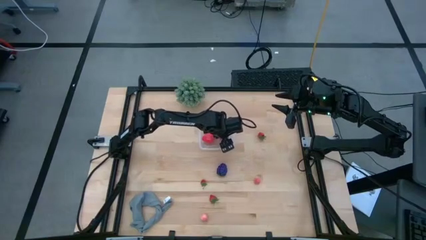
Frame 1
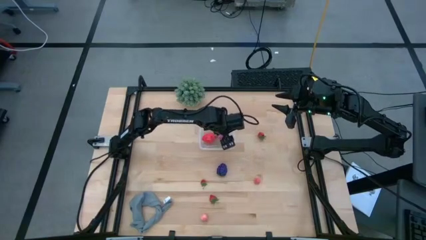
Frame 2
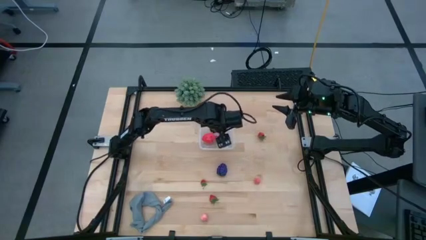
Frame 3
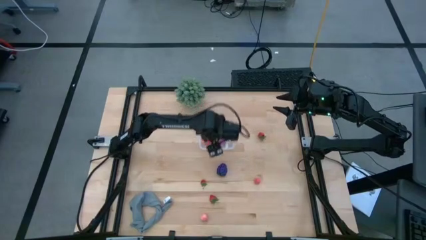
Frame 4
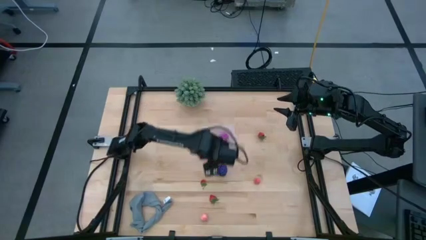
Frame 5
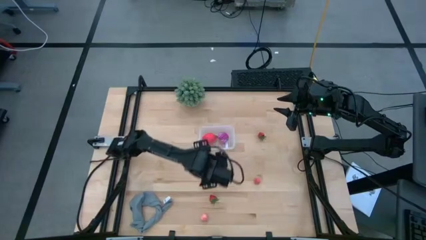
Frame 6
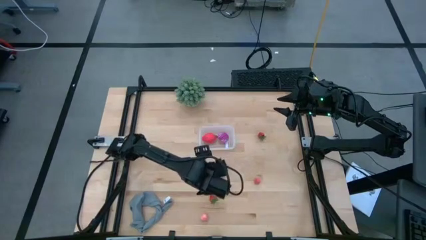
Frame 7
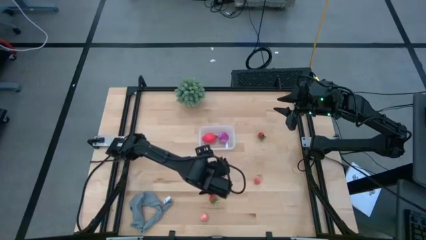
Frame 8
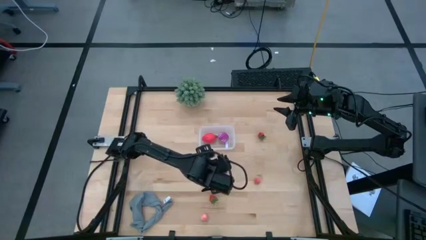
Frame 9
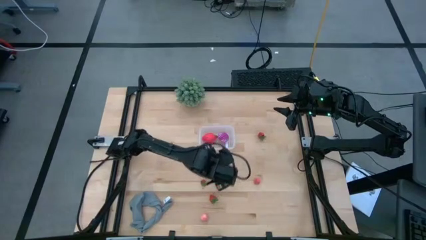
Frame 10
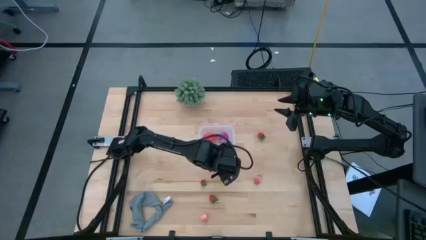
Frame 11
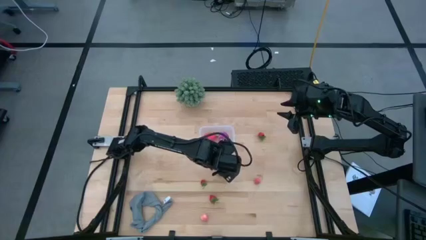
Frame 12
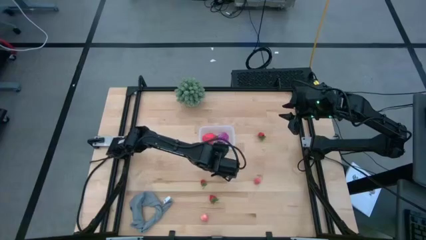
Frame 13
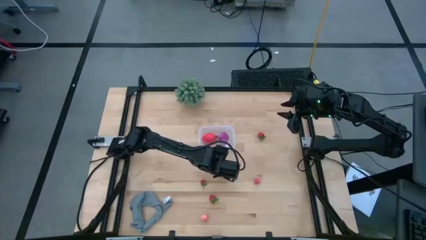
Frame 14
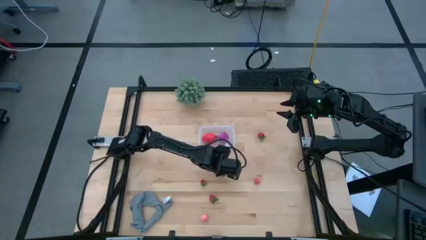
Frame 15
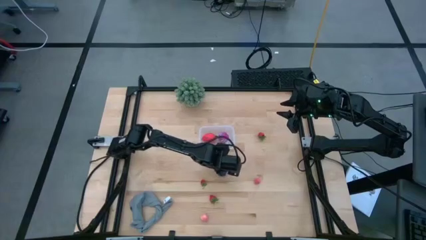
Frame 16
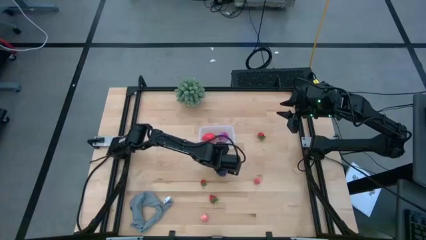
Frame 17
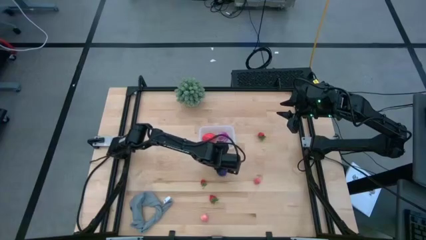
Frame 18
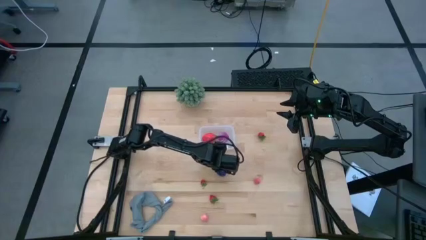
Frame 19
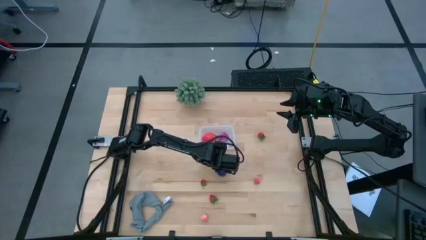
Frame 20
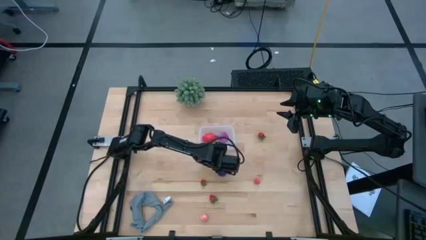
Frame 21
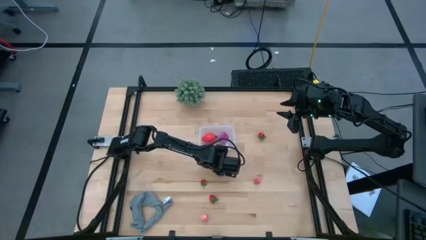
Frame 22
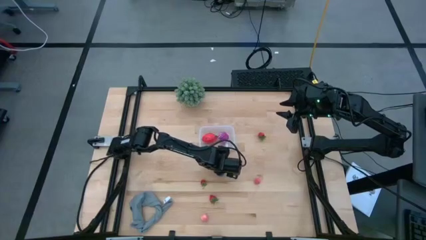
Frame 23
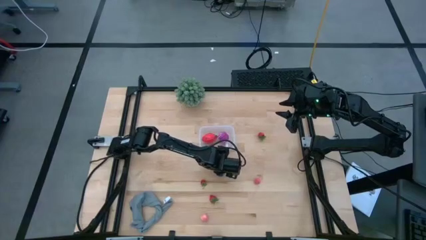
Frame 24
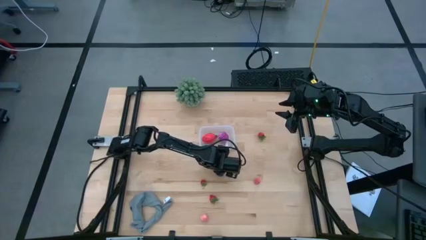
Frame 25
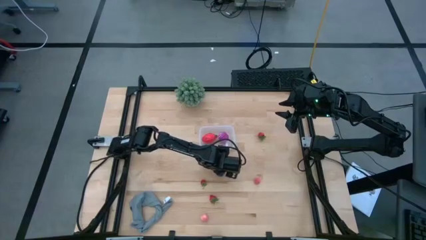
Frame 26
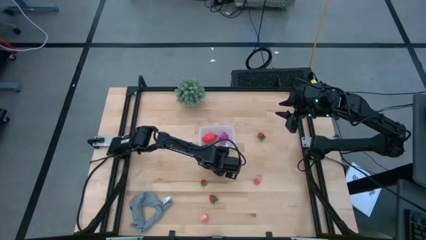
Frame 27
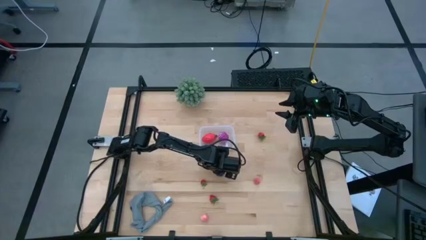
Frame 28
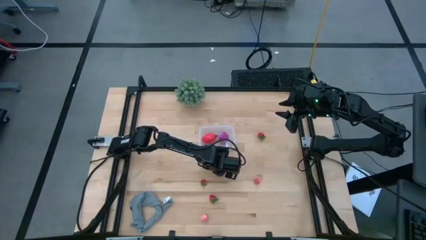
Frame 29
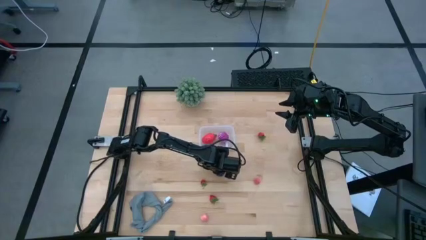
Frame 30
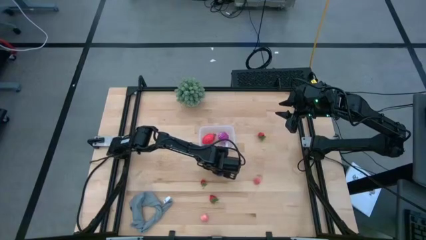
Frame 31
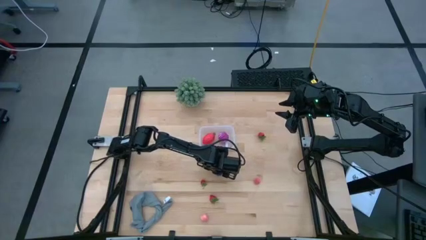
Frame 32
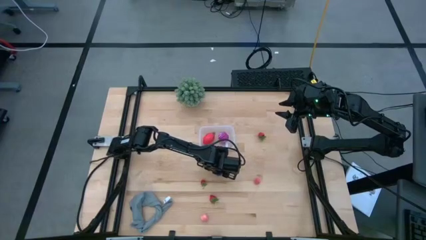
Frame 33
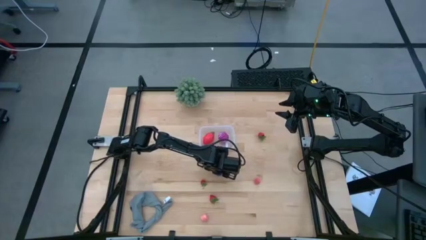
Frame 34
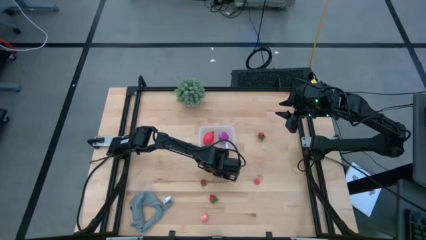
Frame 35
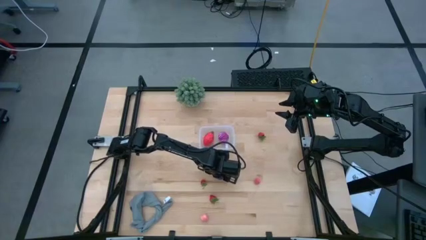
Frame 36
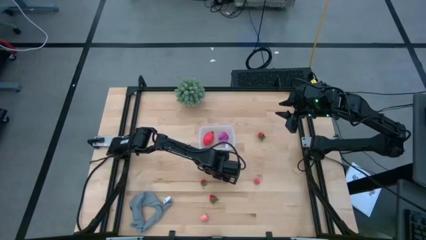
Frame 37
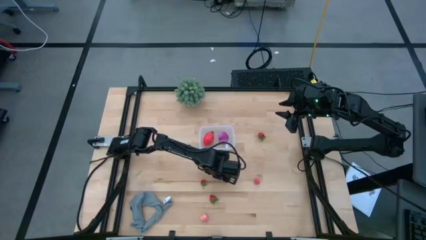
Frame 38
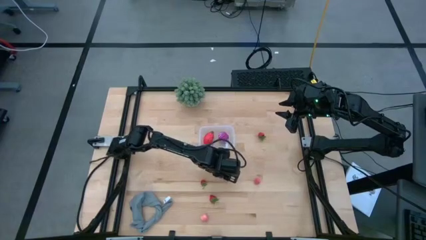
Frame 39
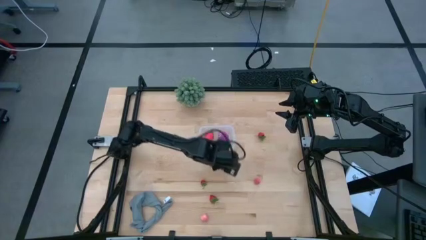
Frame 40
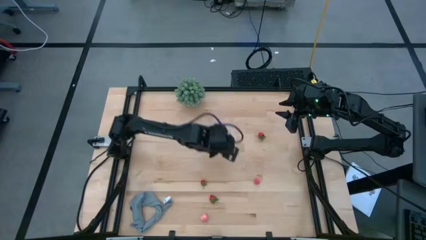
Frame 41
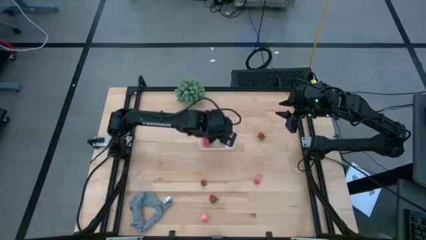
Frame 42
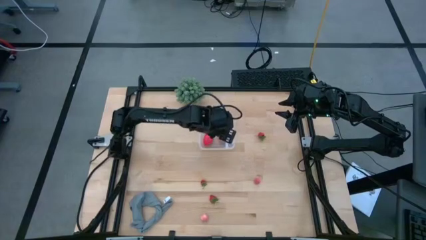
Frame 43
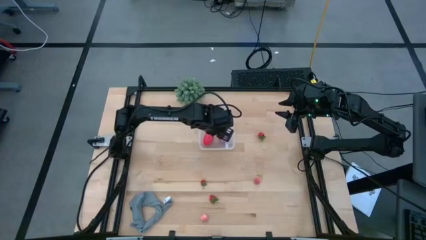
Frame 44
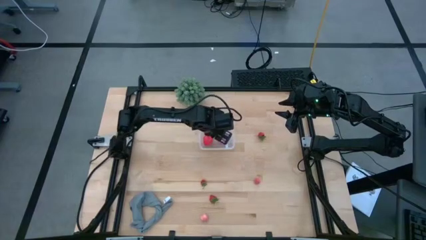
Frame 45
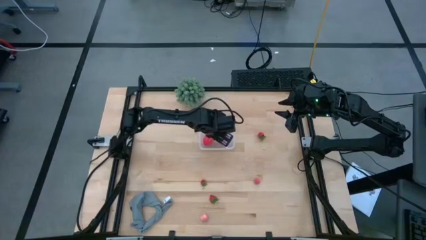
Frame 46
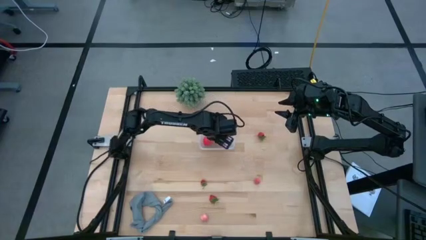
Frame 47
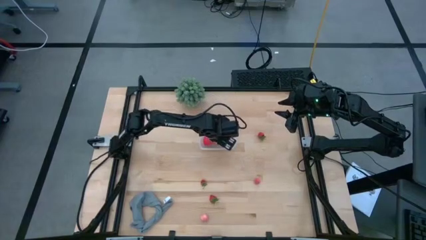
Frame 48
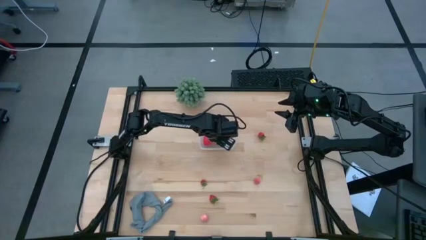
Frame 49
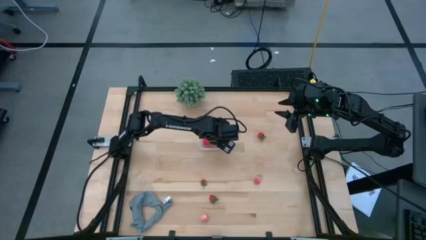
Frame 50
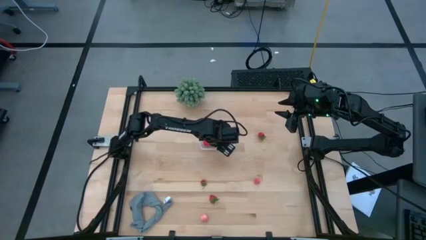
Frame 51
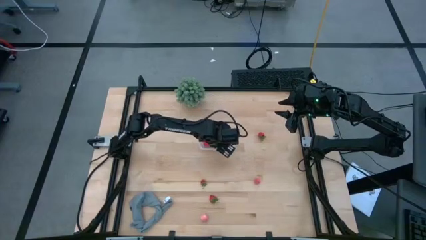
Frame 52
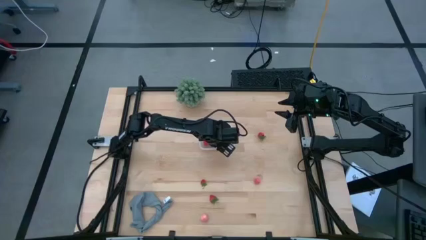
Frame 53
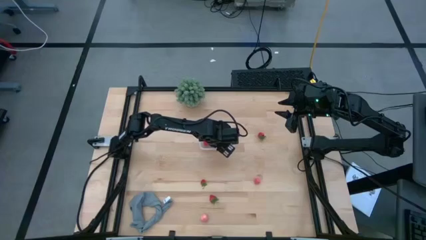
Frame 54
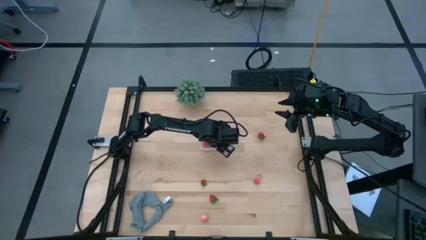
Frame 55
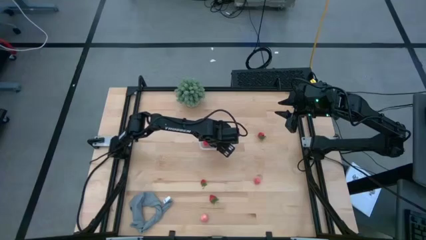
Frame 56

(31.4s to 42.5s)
Task: Pick and placing Produce into tupperware
Put the grapes into the bin
